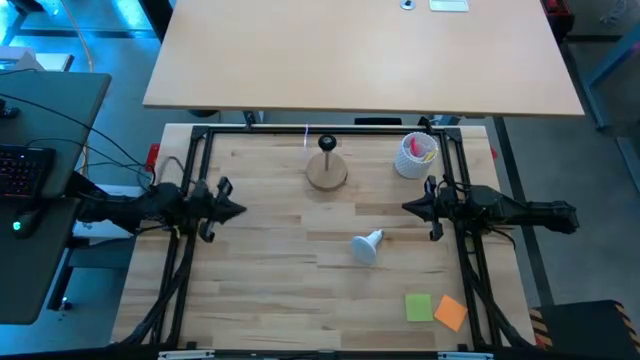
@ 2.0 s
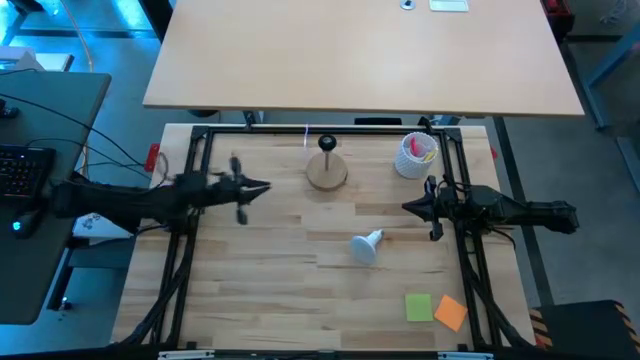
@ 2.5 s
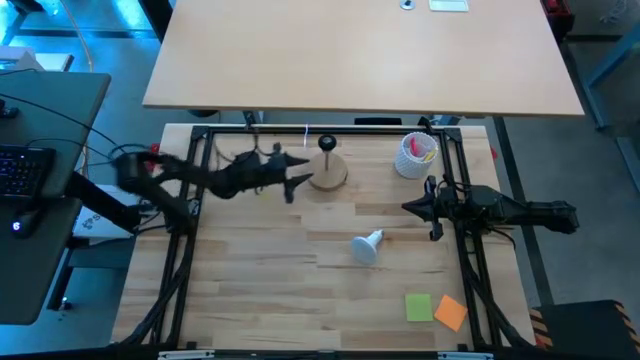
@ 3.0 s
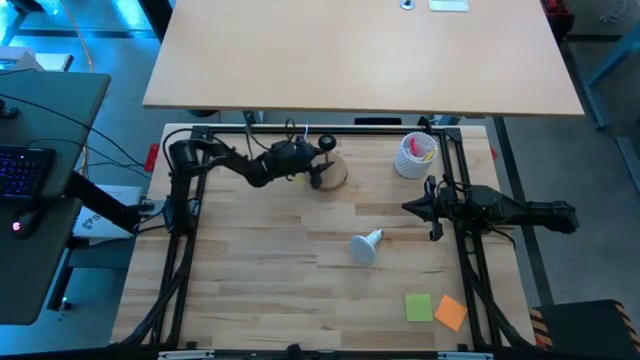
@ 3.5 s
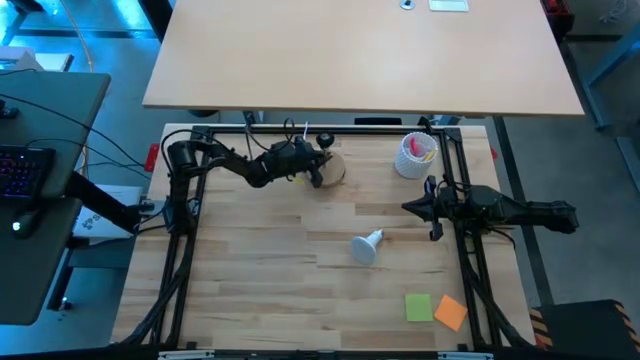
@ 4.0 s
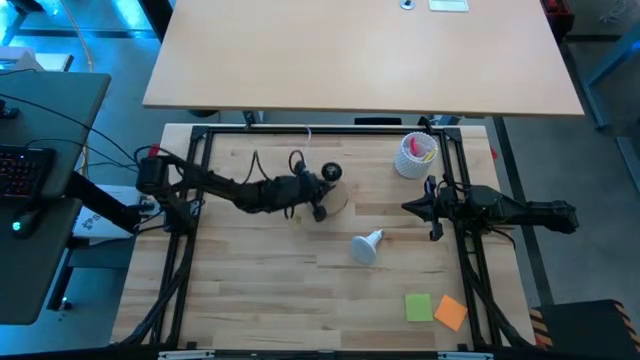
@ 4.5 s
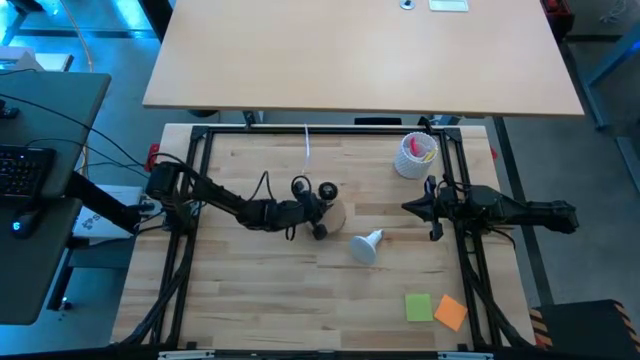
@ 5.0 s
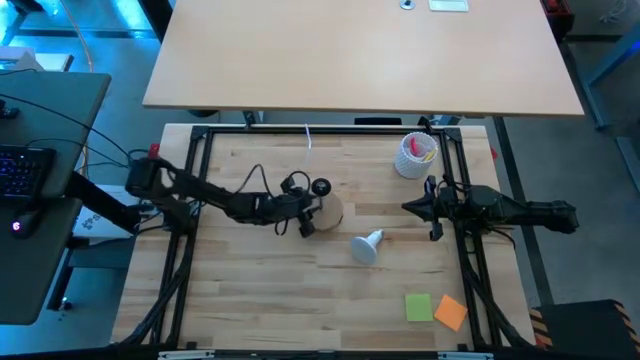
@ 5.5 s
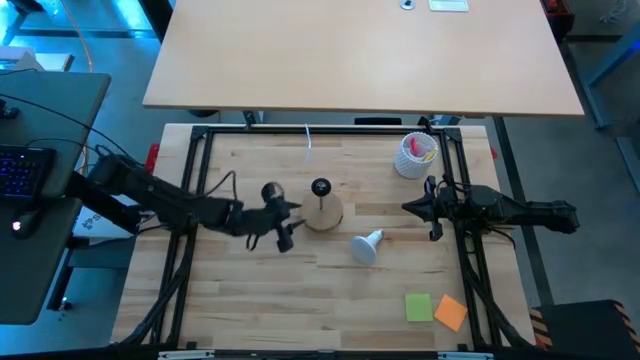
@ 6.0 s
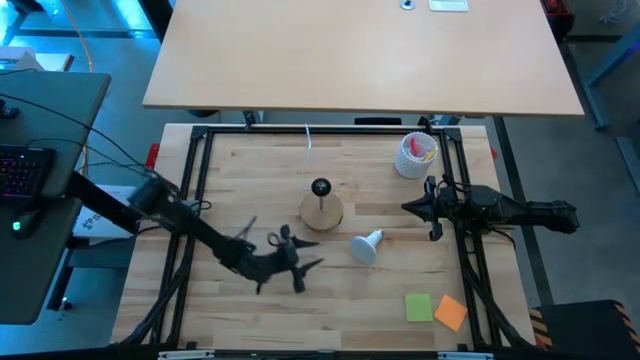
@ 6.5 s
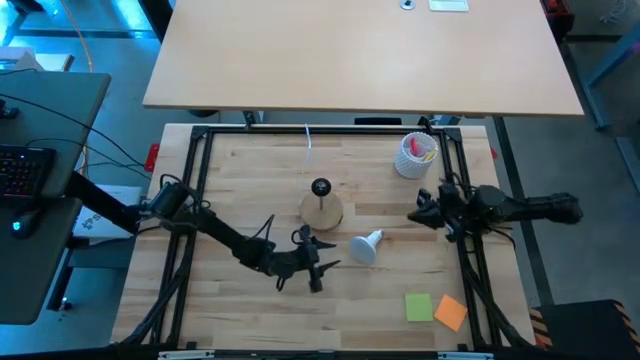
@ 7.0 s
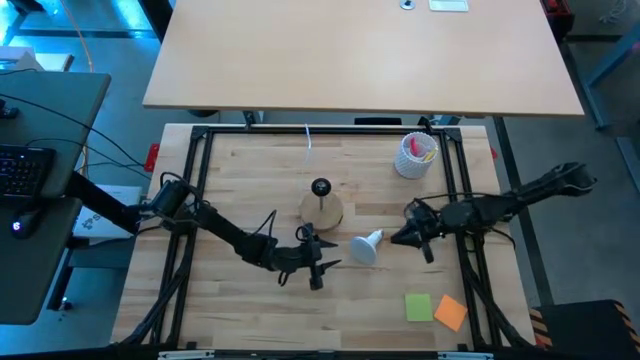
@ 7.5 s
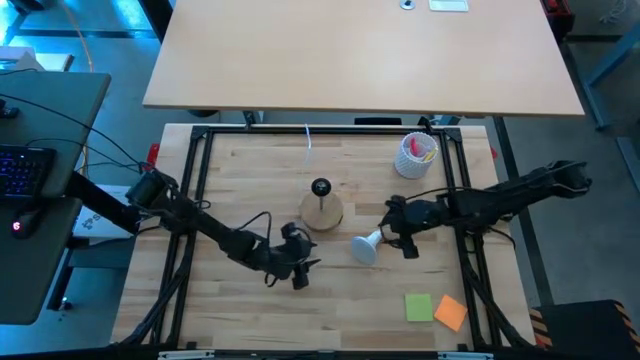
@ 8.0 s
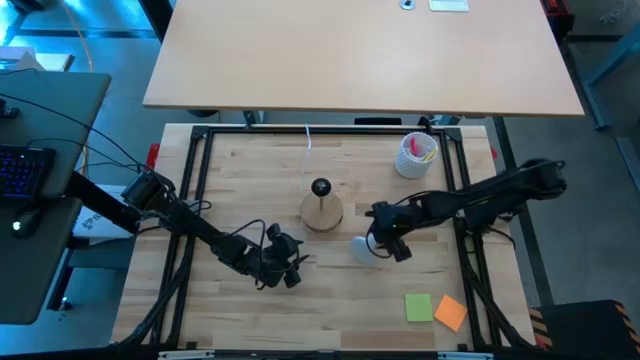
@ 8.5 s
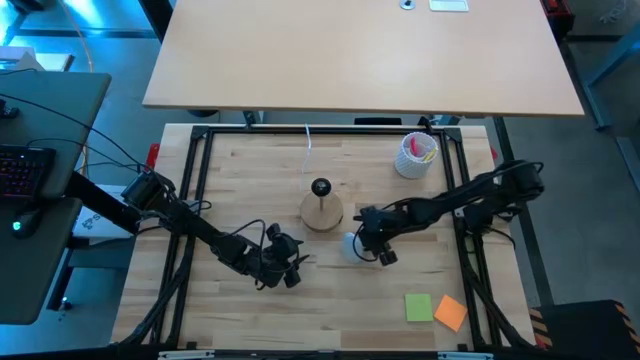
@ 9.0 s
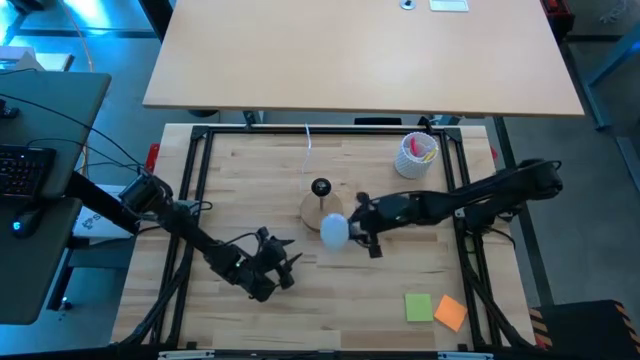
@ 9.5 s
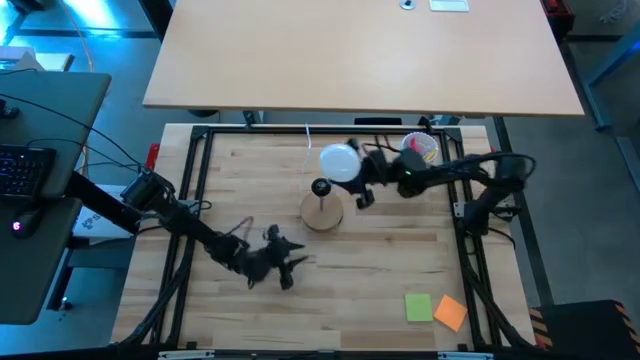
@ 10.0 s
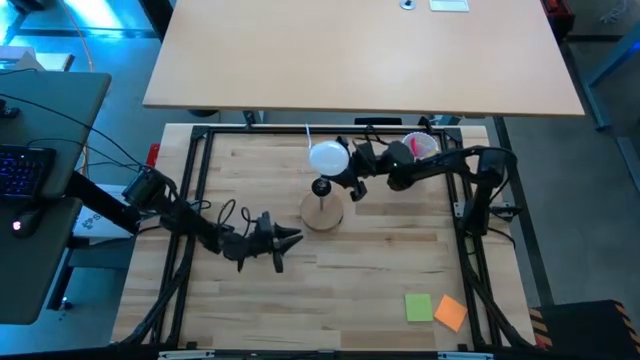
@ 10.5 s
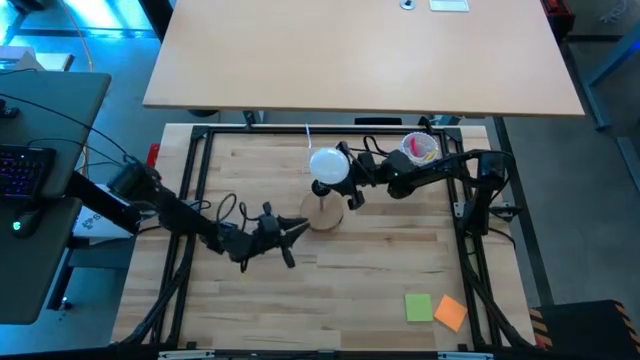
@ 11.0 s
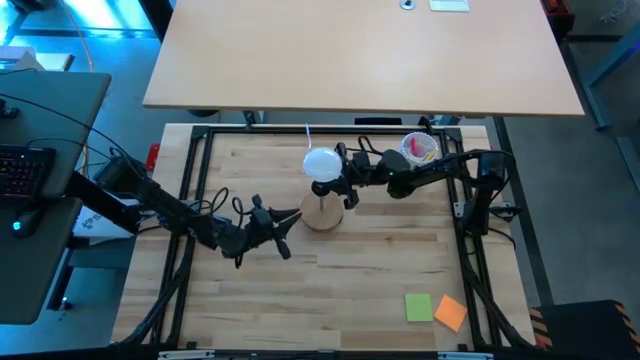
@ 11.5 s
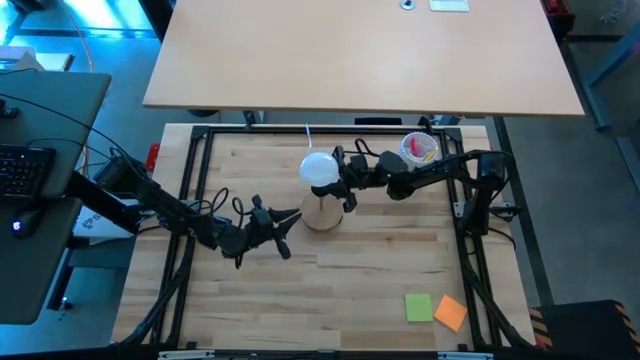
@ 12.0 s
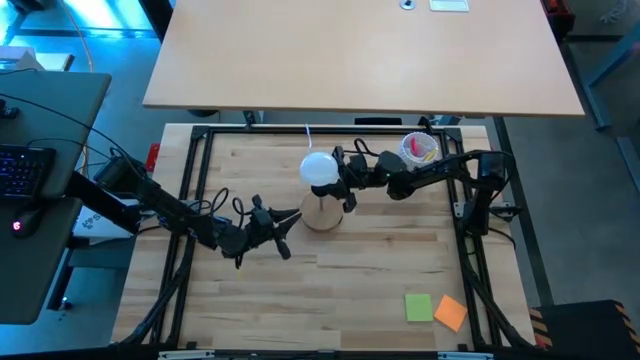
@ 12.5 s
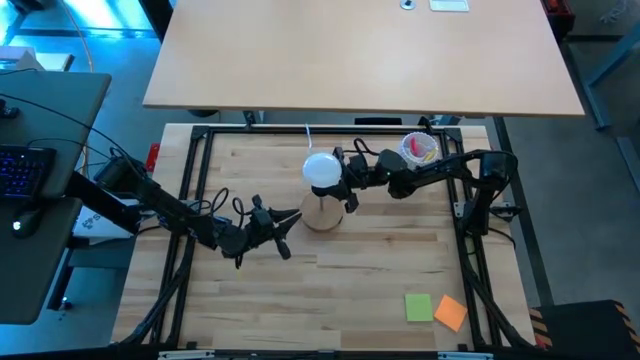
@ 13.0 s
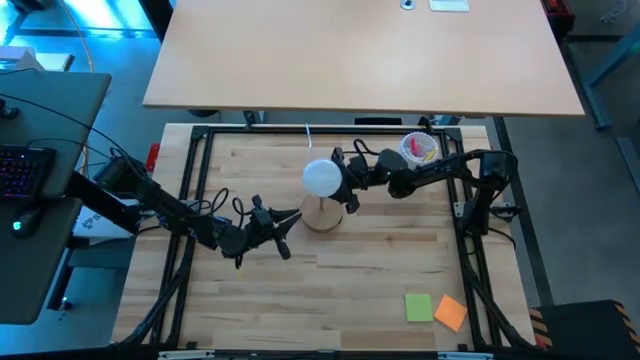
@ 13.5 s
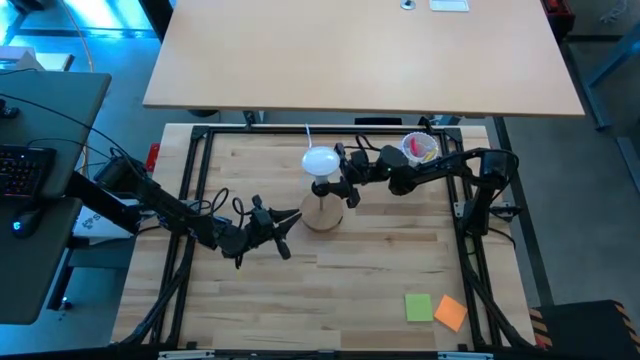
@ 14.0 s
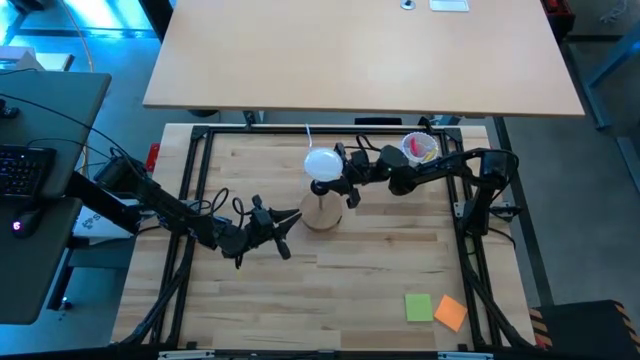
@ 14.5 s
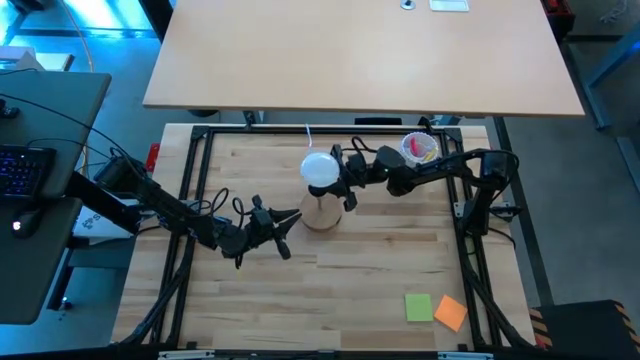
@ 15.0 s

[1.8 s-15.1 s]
Task: Screw lightbulb
Insert the lightbulb into the brown lamp
